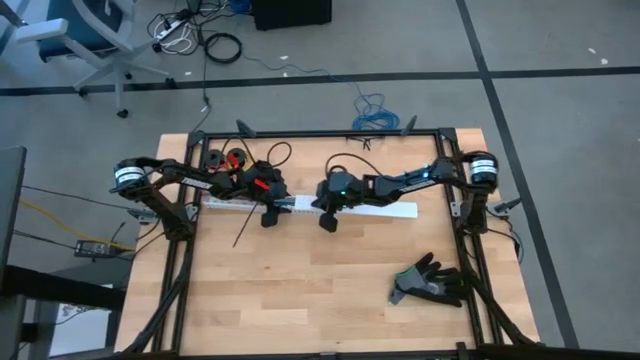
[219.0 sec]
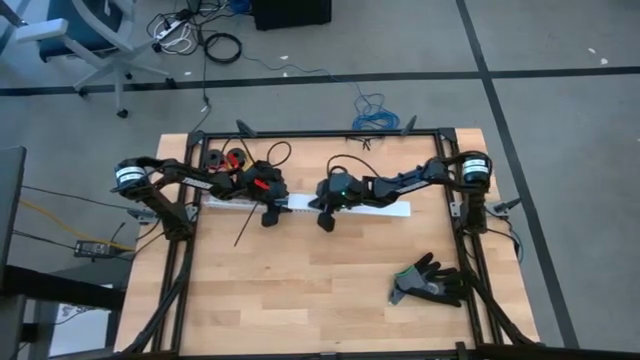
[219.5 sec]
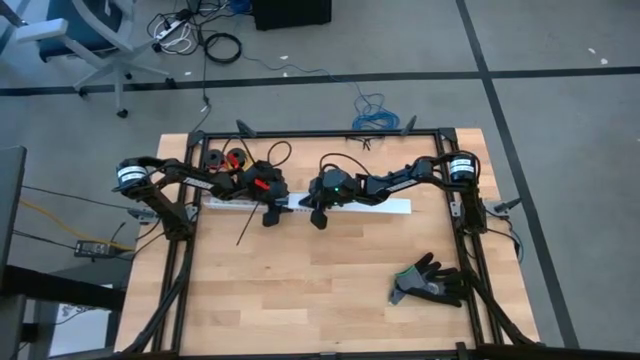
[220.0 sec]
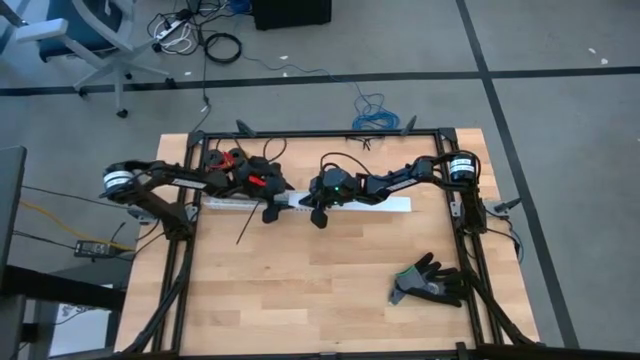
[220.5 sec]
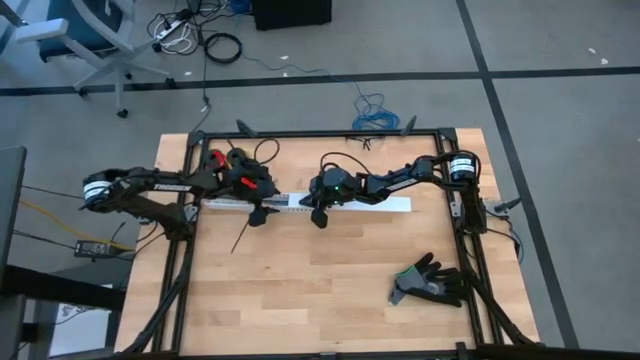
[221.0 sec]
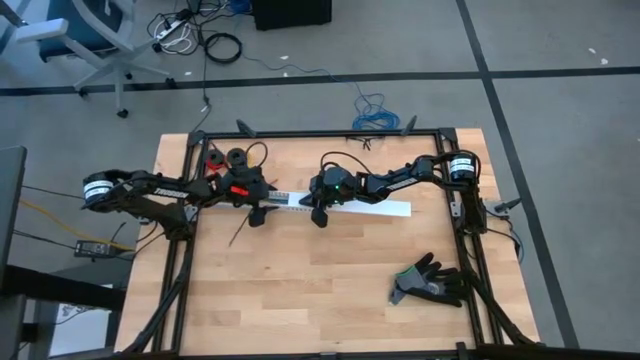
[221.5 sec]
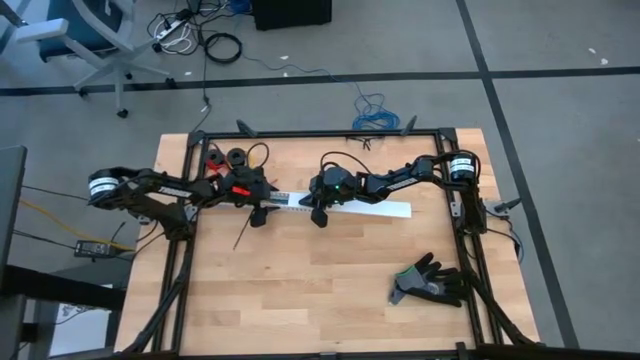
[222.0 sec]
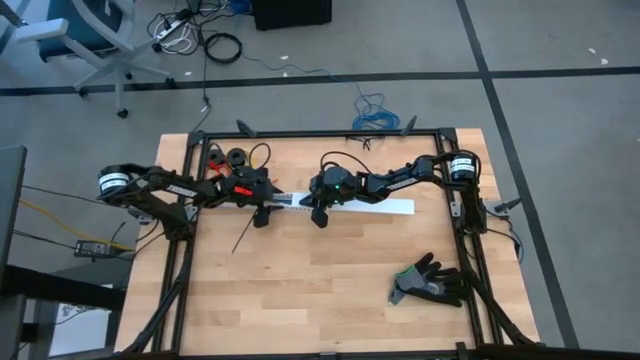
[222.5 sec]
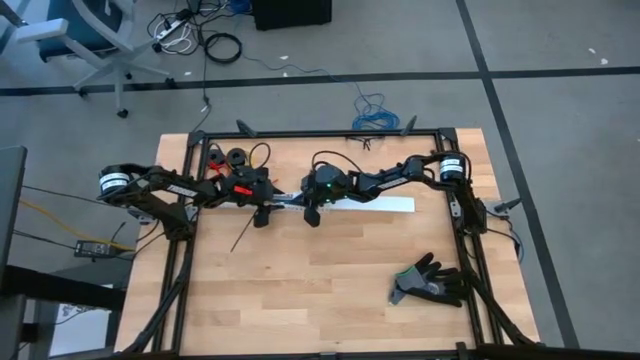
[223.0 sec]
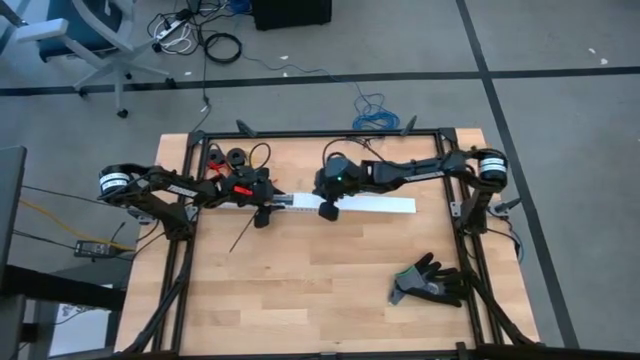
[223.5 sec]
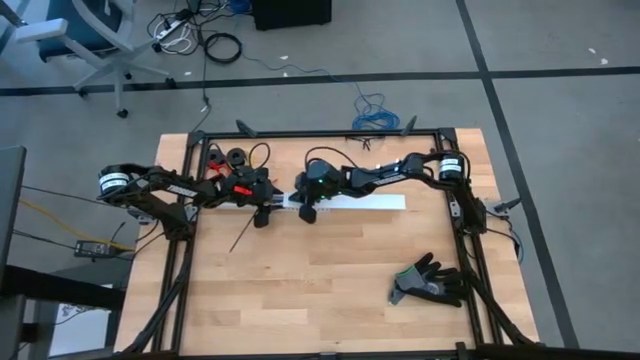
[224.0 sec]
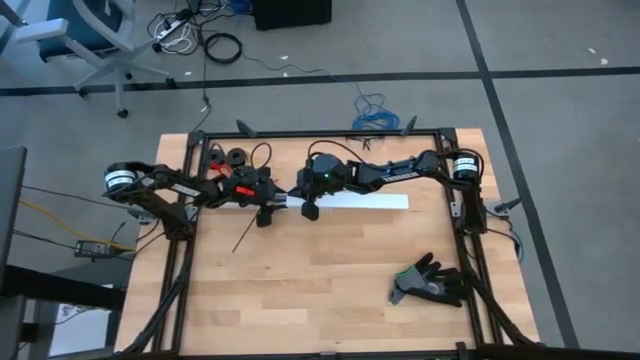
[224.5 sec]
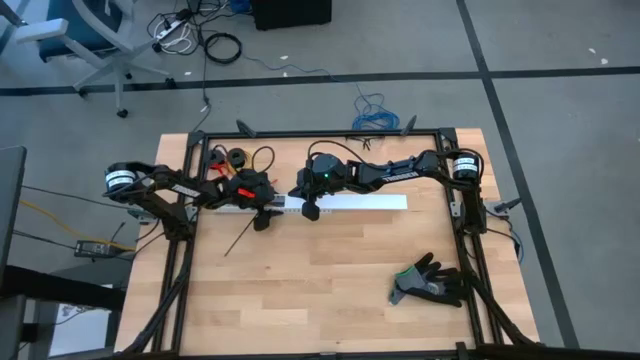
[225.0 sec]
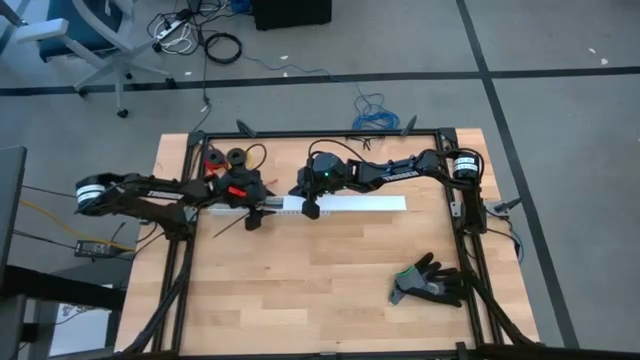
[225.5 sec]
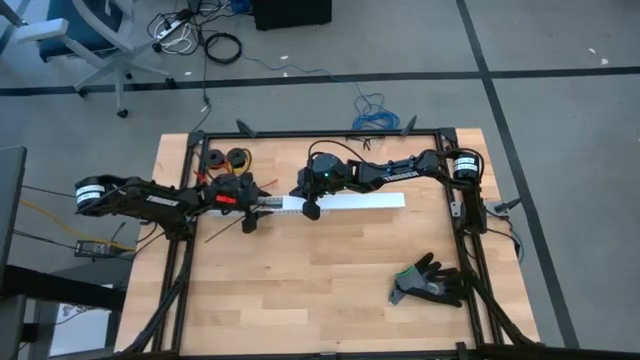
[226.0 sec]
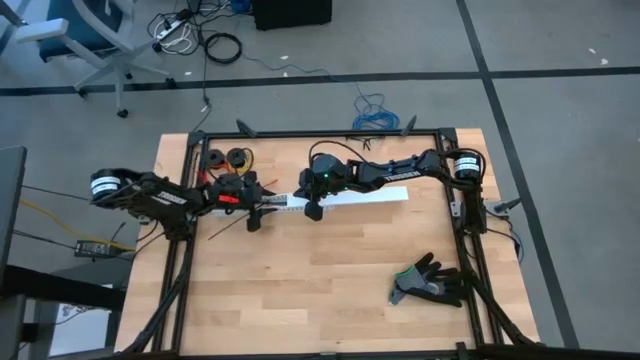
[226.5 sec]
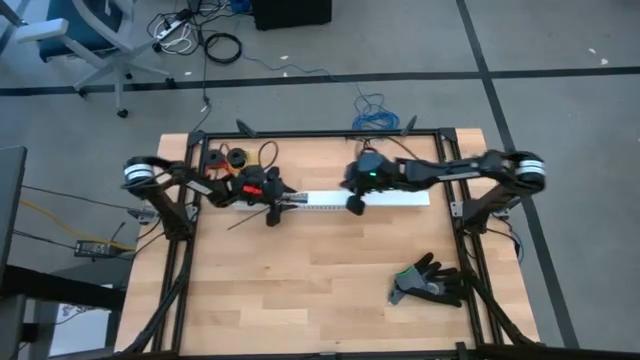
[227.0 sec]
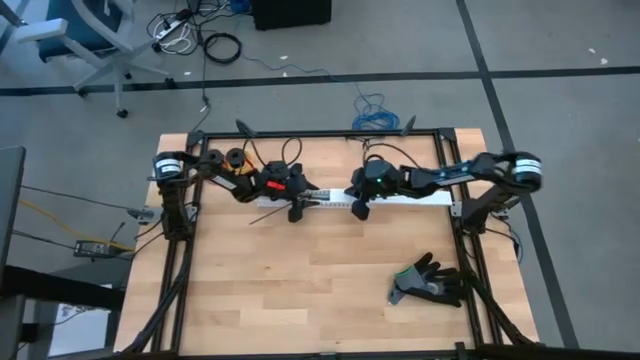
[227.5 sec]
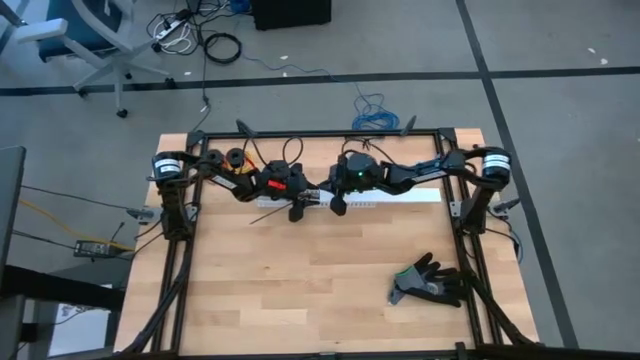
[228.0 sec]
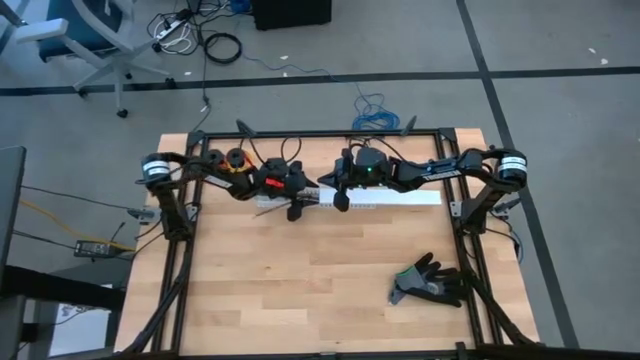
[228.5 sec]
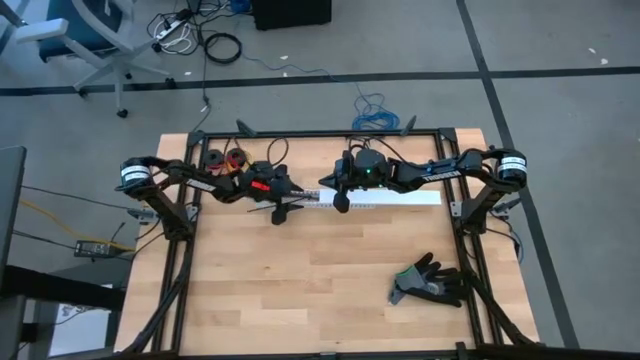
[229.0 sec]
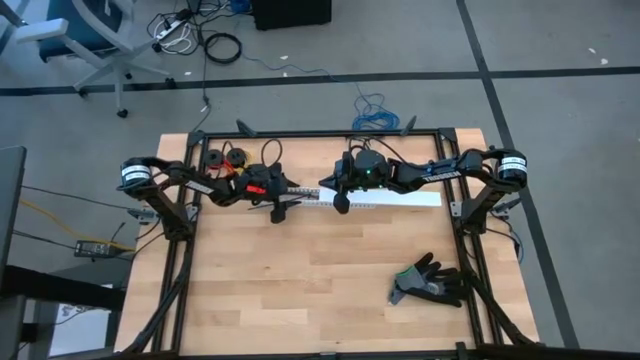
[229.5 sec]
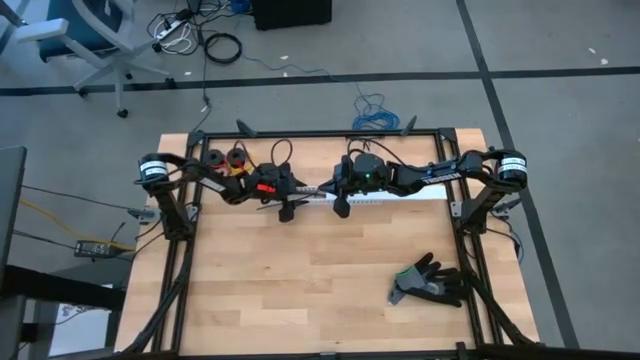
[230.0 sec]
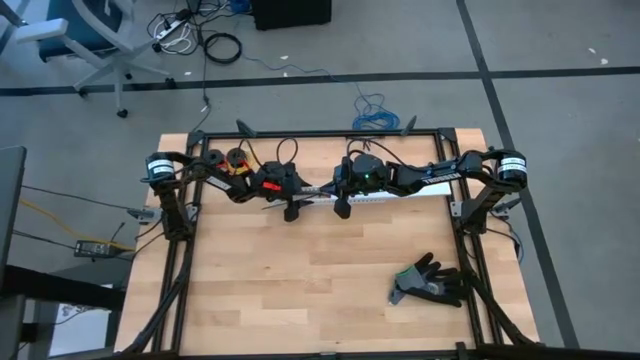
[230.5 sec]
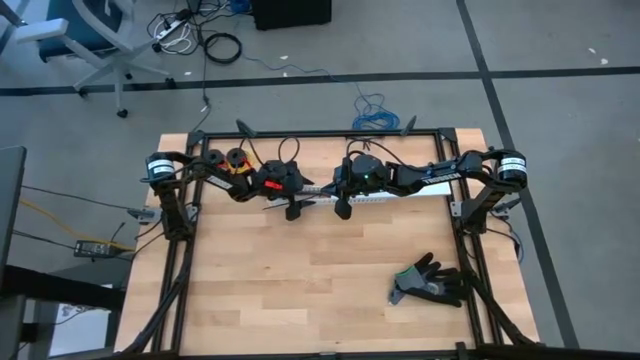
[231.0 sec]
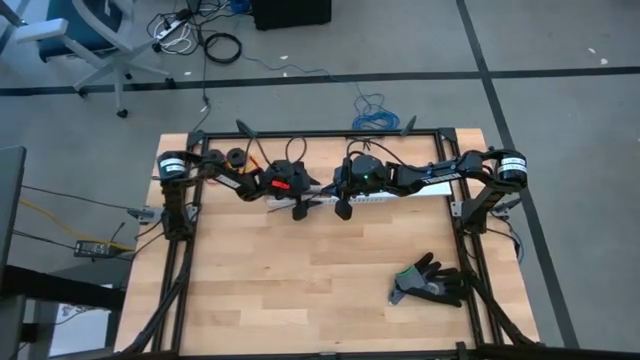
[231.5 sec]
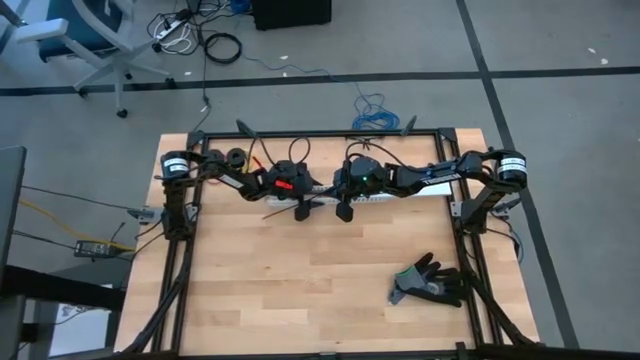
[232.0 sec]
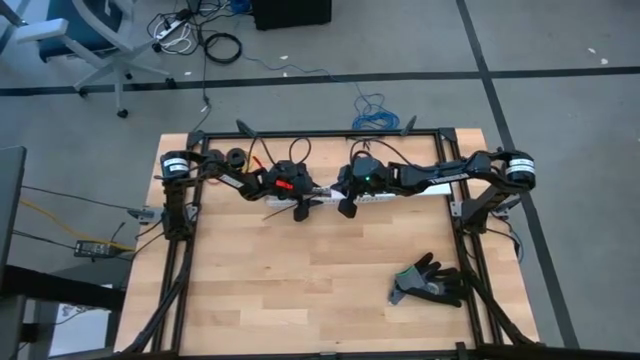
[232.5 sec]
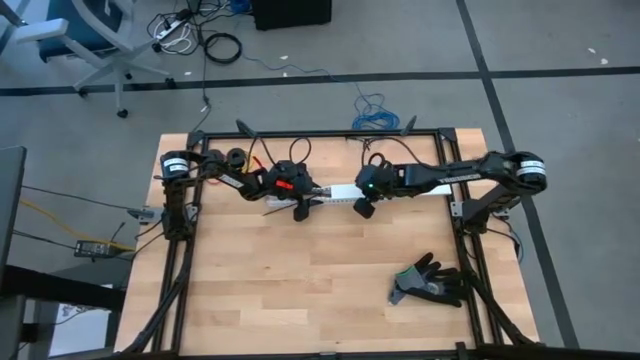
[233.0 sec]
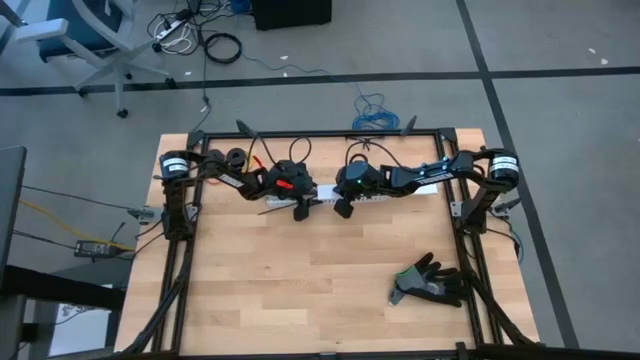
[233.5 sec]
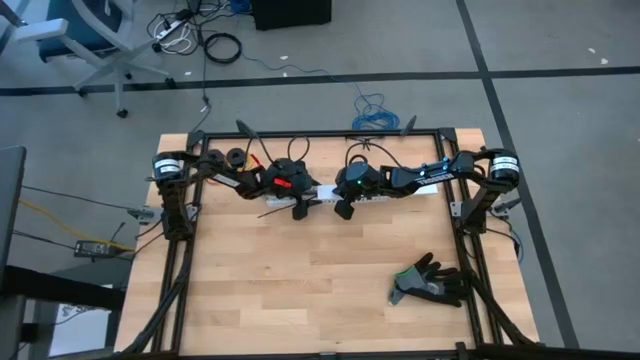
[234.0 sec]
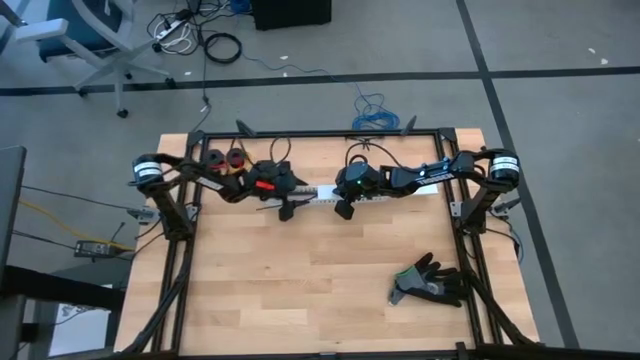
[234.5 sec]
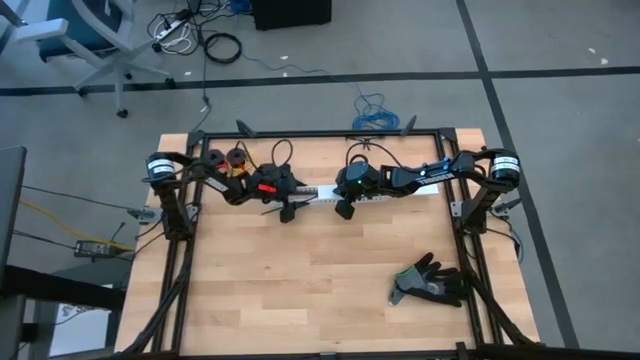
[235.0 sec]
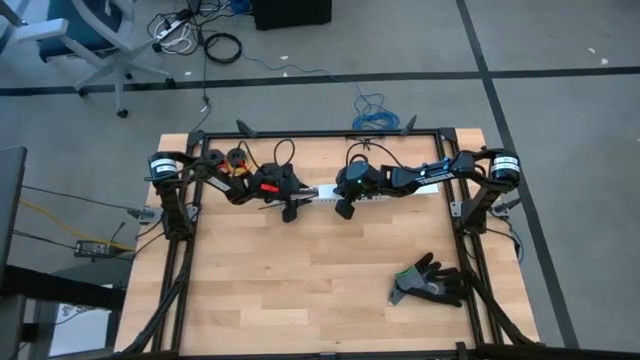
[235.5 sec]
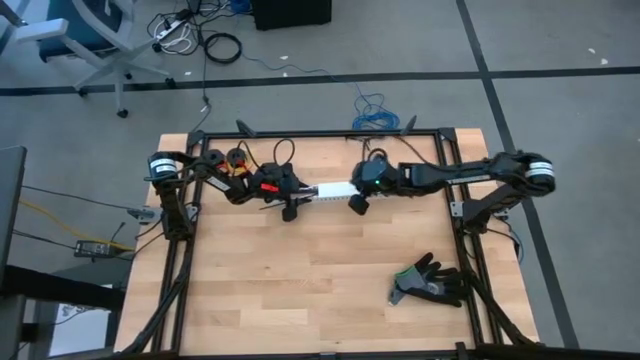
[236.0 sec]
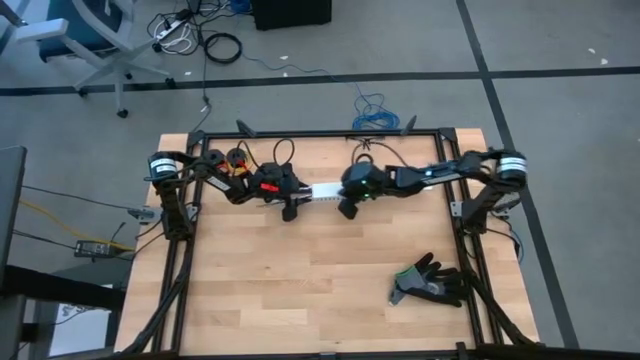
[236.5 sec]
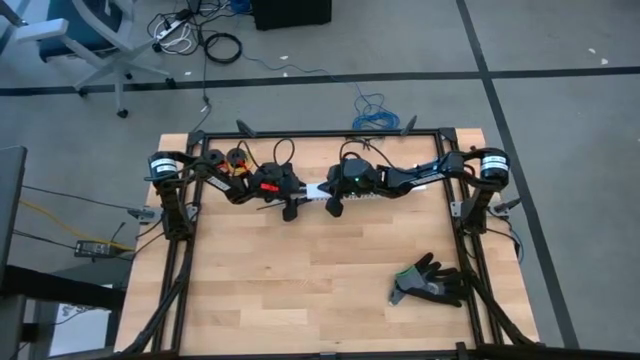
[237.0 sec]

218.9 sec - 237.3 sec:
Task: Ziptie cables
Close the white cable duct

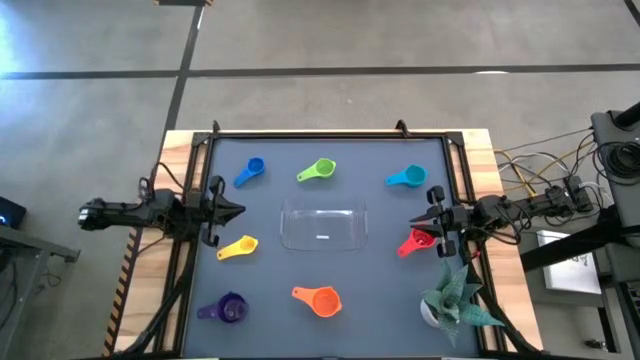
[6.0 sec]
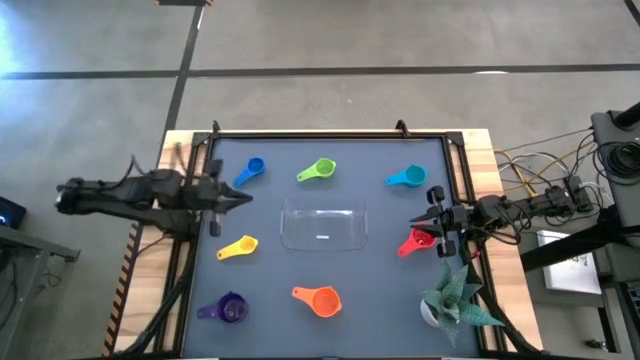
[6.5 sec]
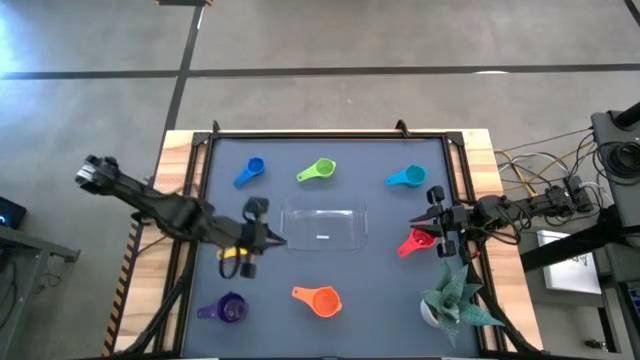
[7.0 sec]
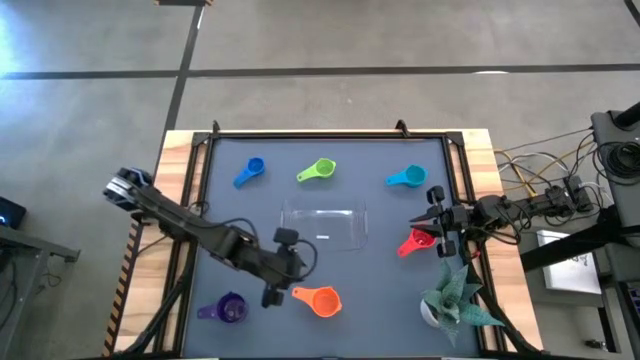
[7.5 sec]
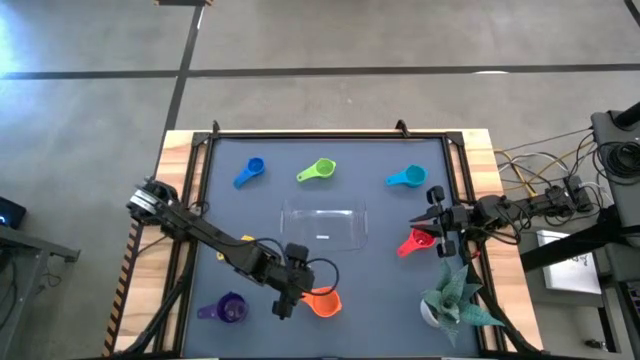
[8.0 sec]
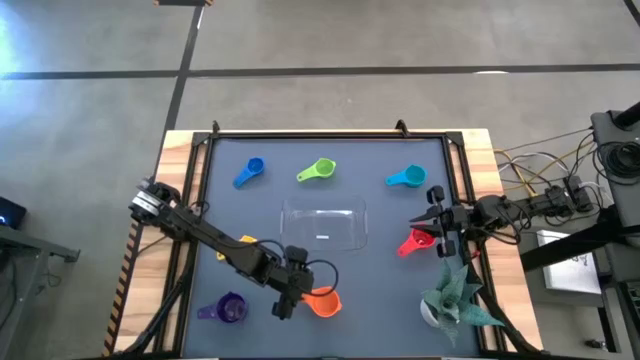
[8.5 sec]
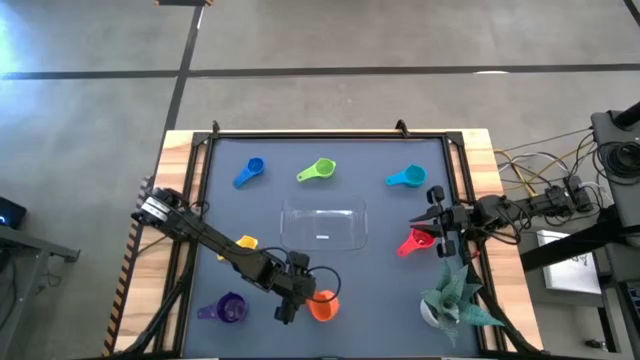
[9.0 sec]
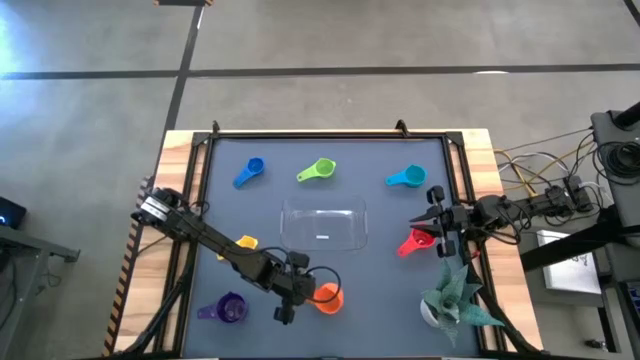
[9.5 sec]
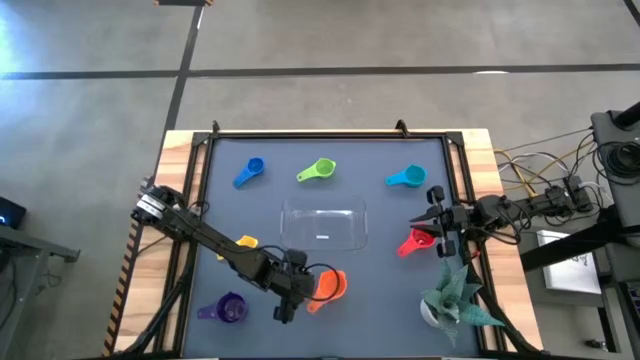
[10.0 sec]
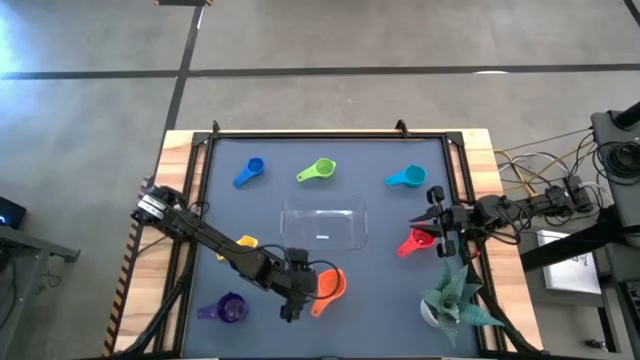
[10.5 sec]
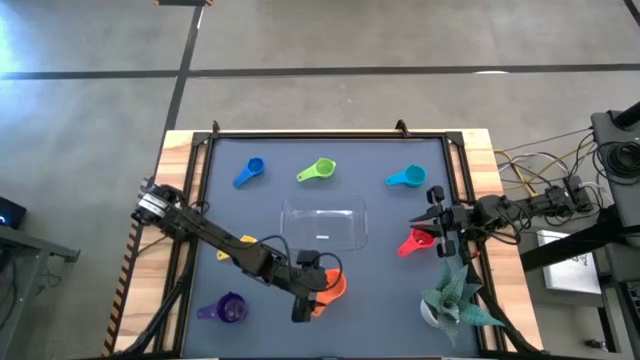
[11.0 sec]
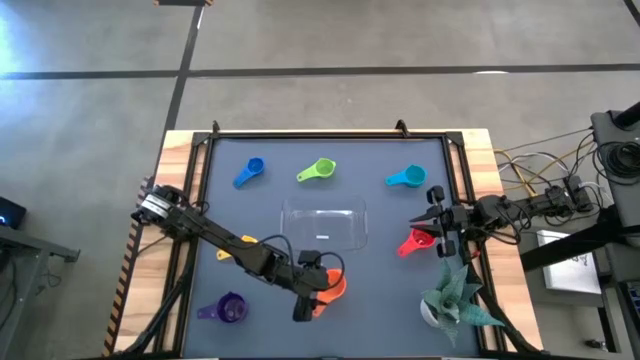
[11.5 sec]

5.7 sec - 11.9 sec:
Task: Nest measuring cups in basket
Stack the orange measuring cup on top of the violet measuring cup
